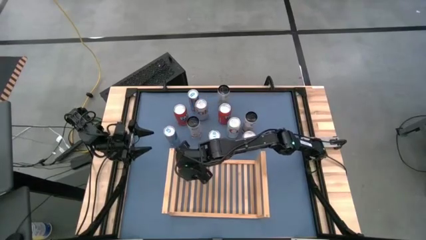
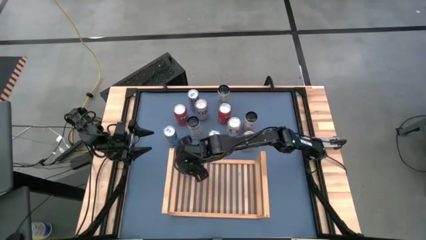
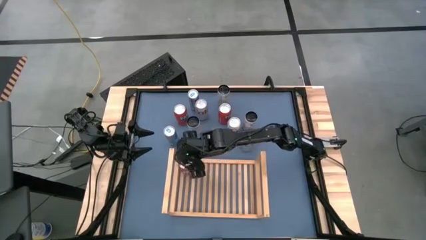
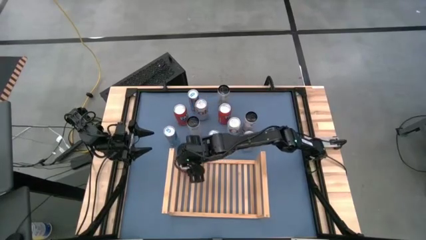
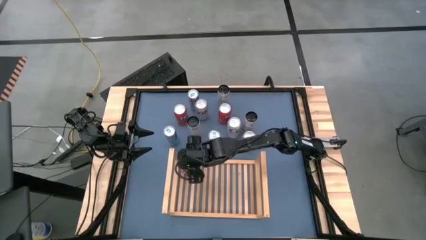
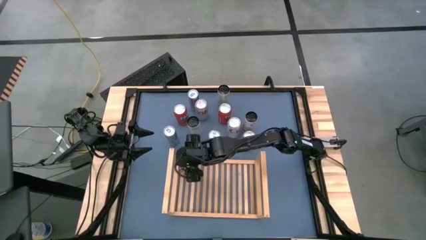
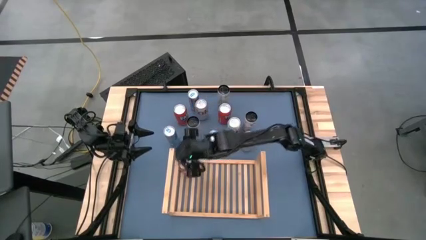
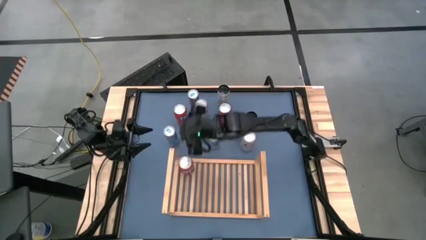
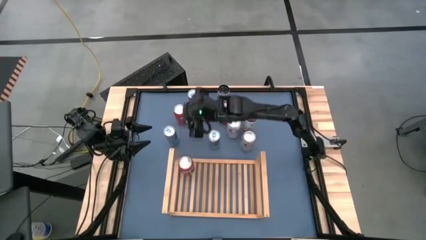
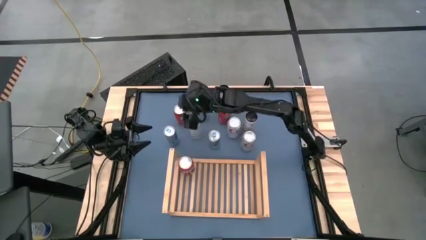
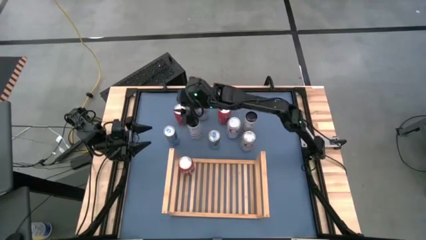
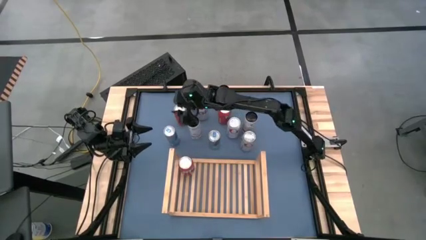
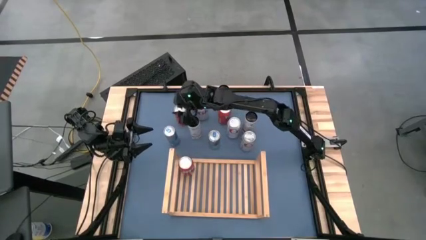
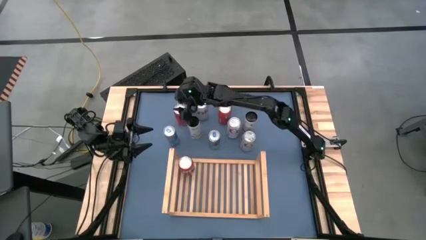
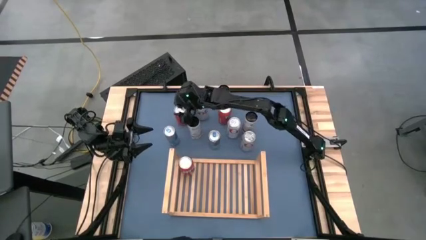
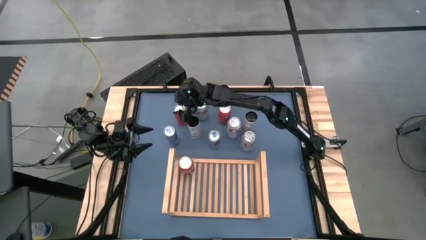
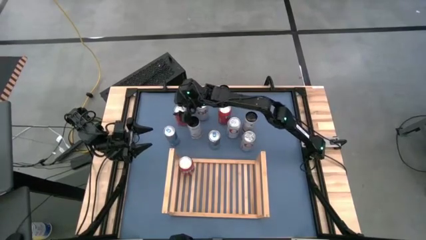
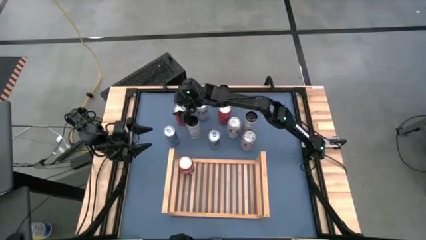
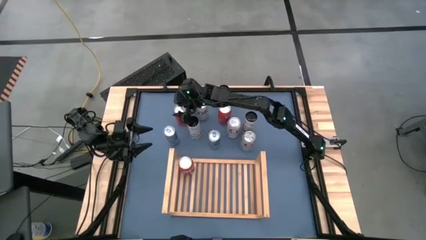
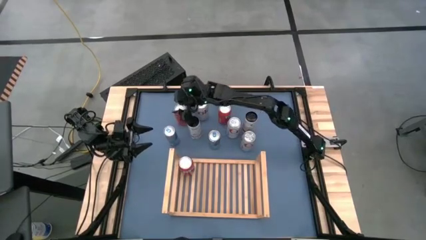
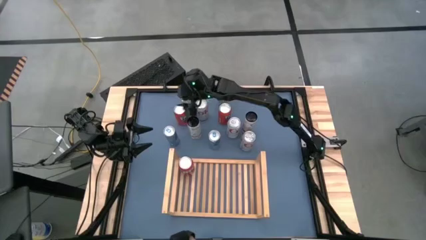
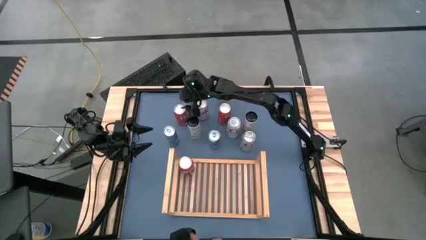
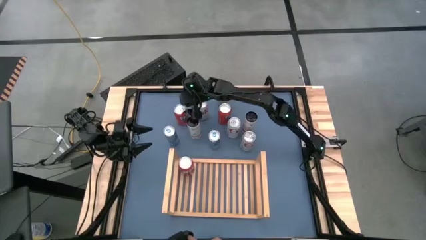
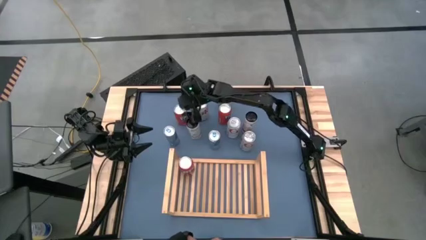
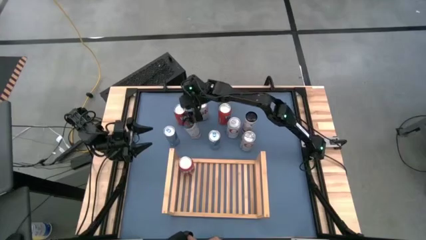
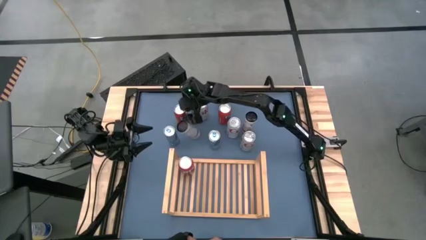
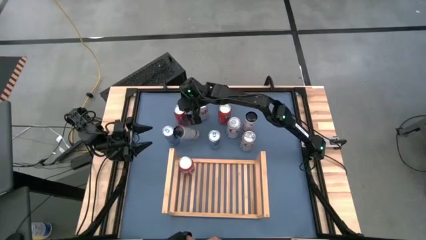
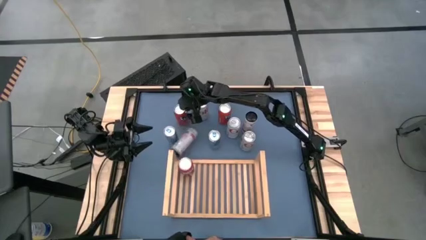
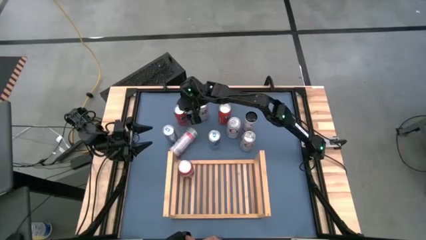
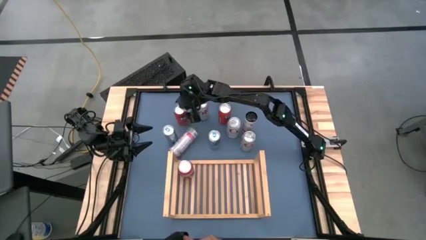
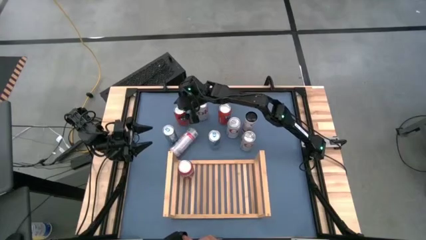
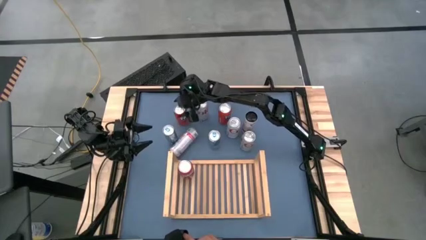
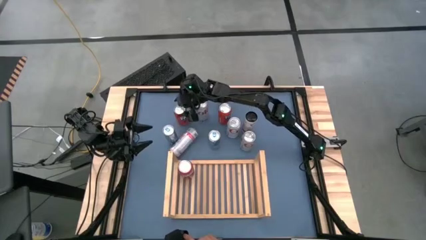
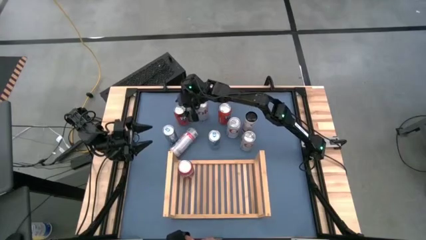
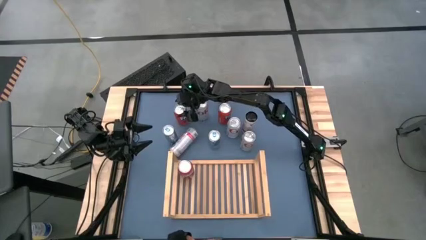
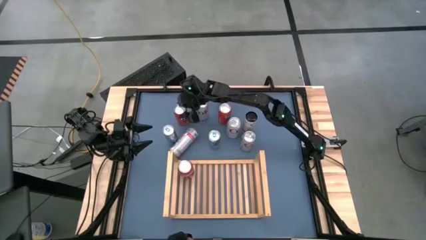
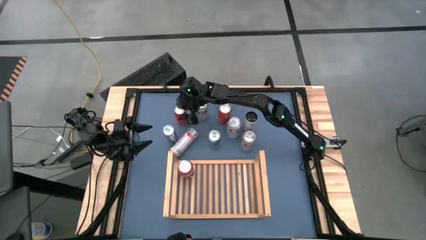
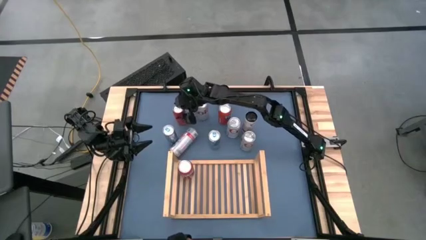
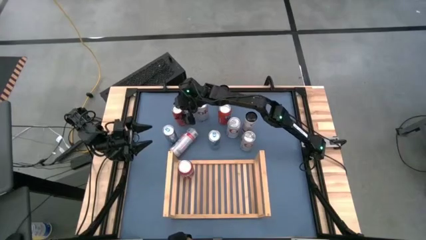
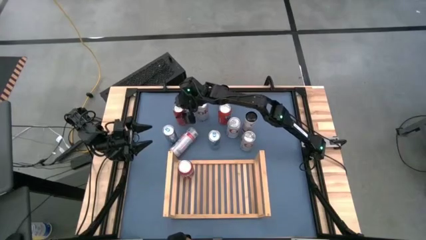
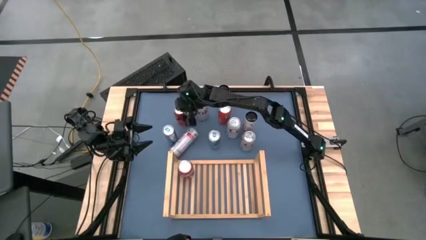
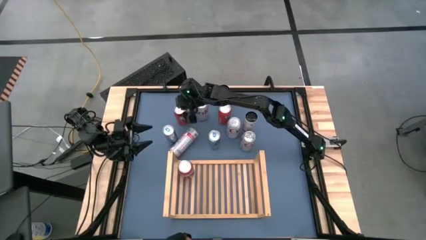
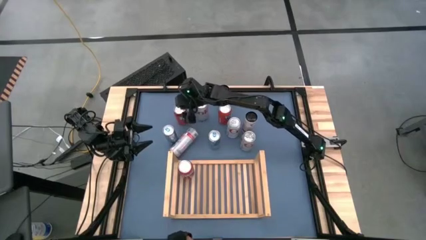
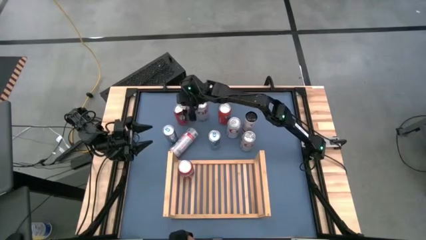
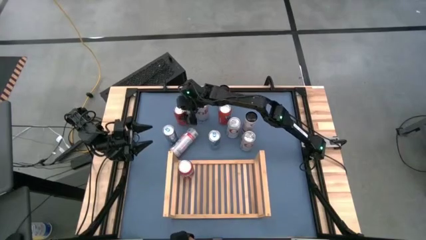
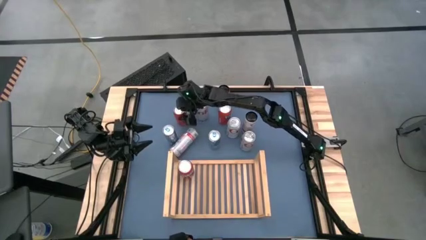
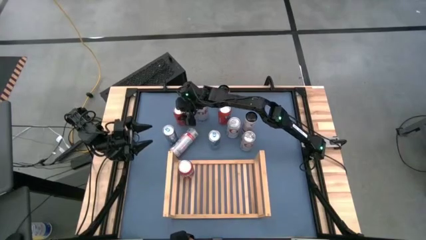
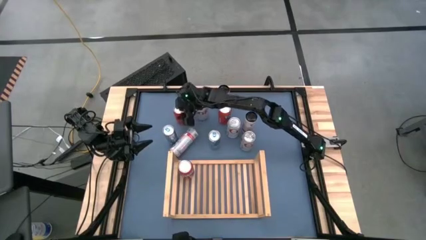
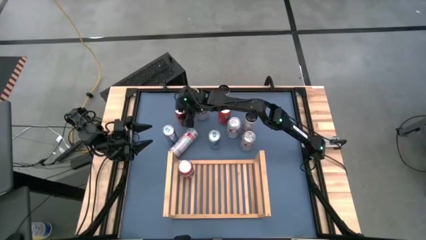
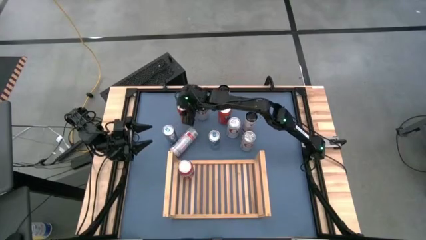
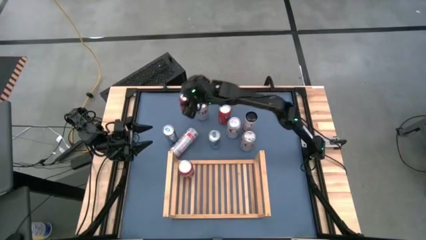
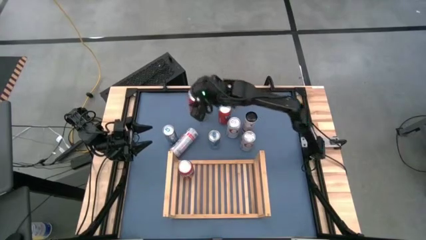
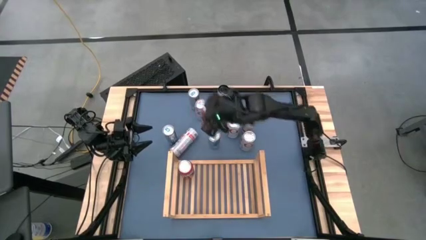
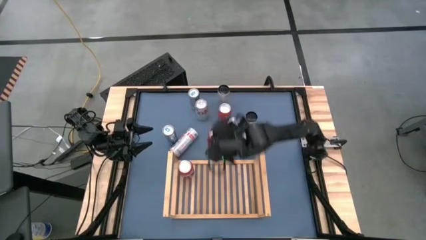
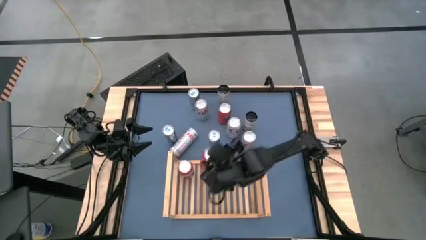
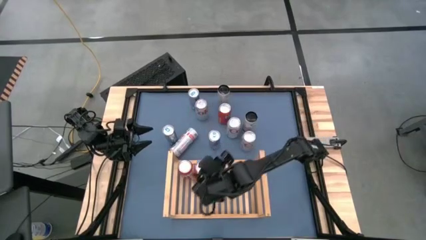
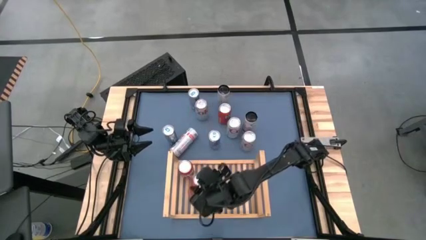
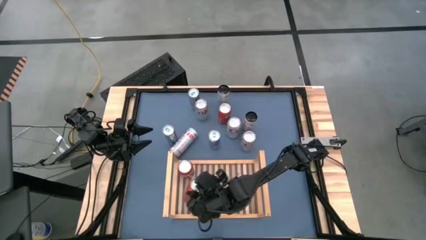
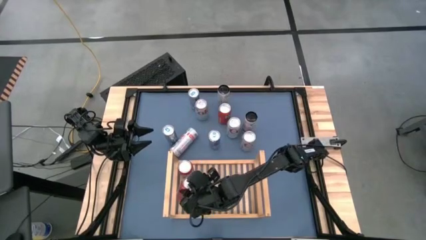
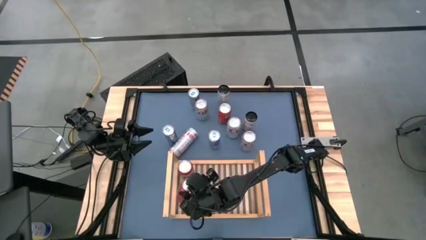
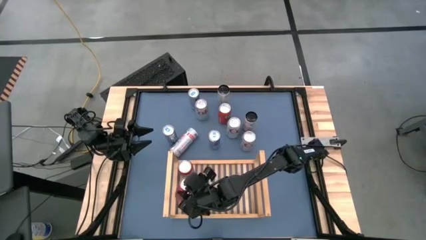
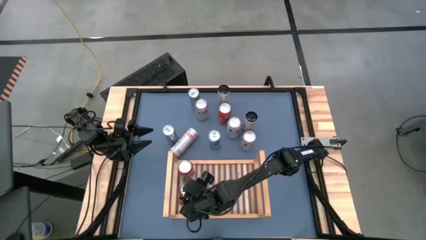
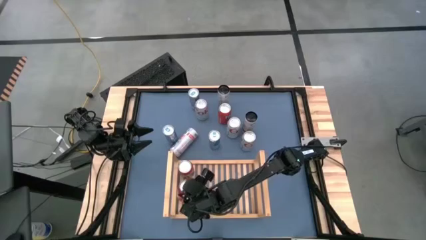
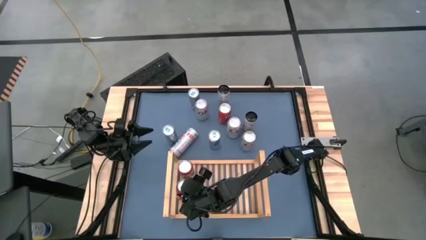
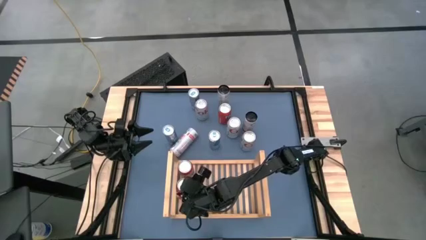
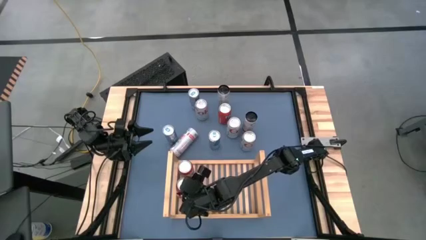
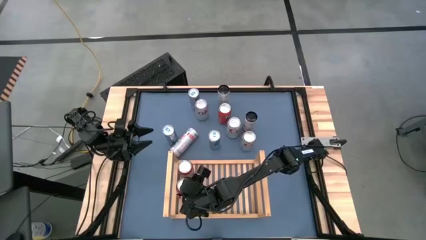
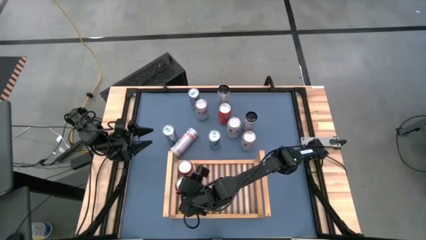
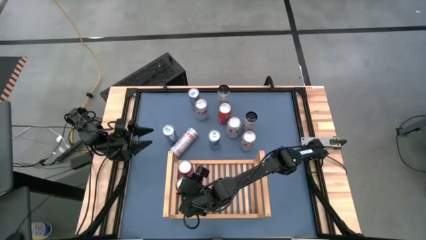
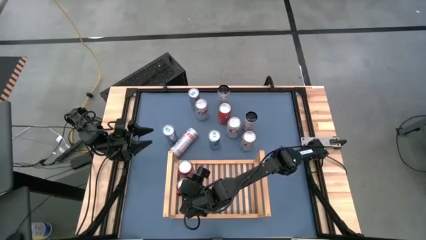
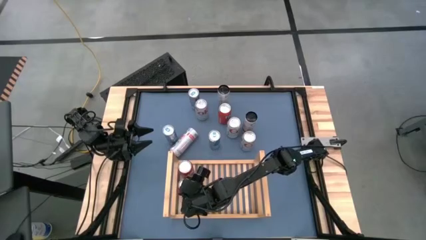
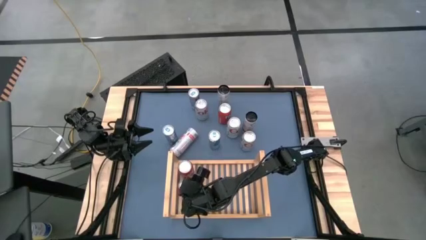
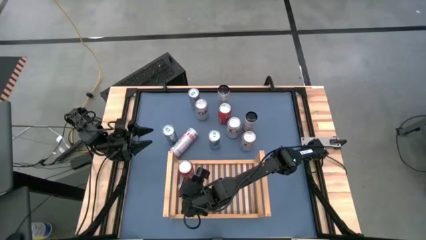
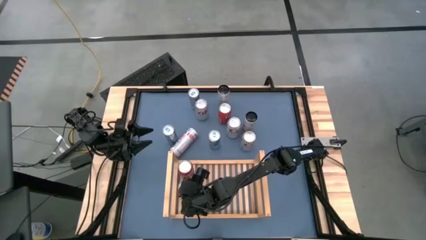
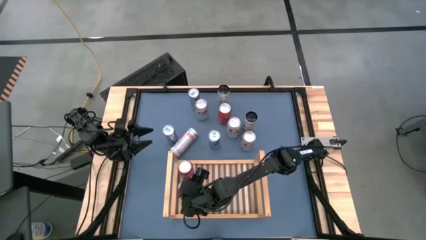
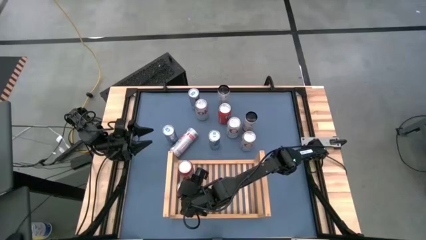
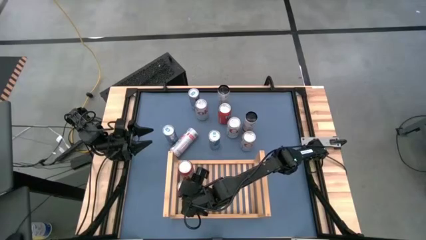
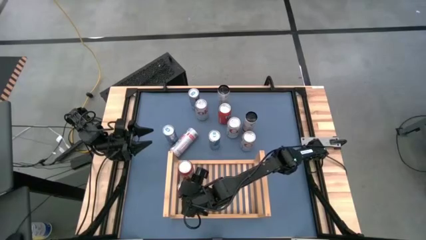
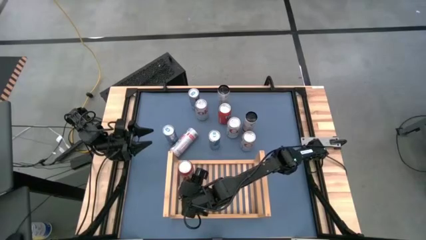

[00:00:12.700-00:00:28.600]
Task: Place canned beverage on shelf
Put the left red soda can on the shelf aligned with the other red soda can
